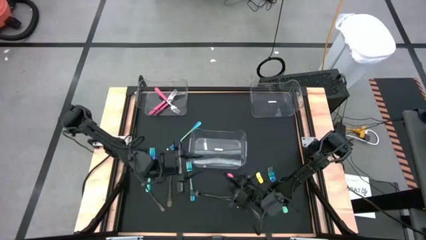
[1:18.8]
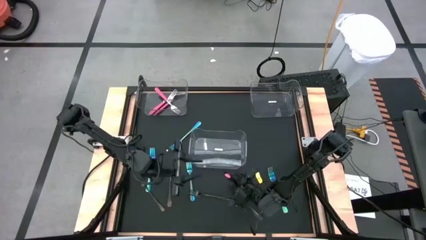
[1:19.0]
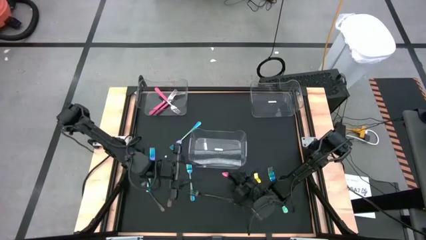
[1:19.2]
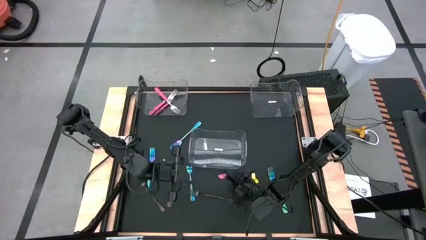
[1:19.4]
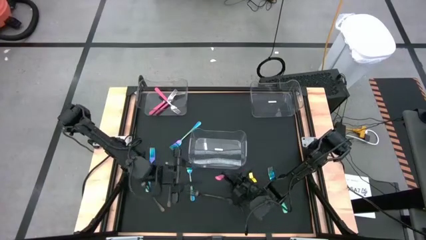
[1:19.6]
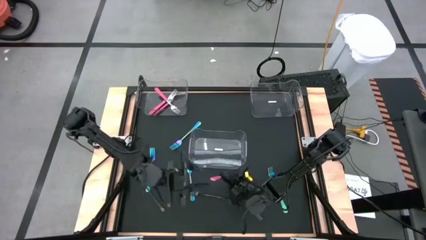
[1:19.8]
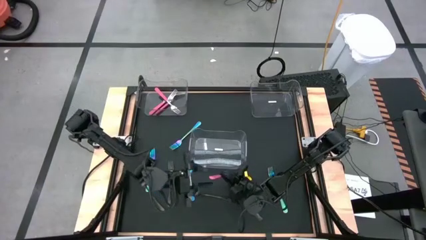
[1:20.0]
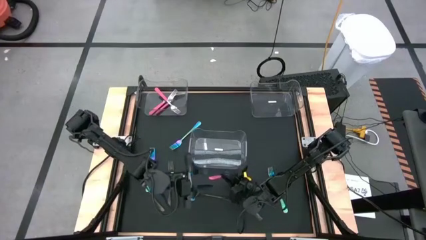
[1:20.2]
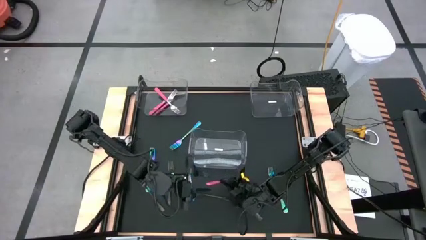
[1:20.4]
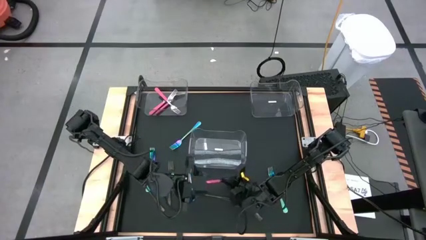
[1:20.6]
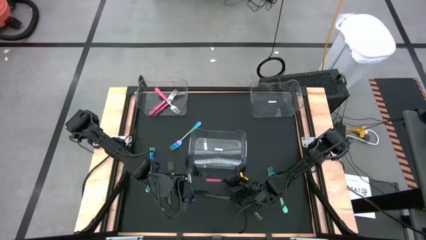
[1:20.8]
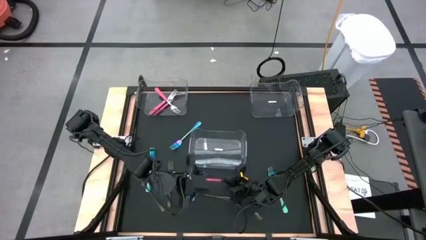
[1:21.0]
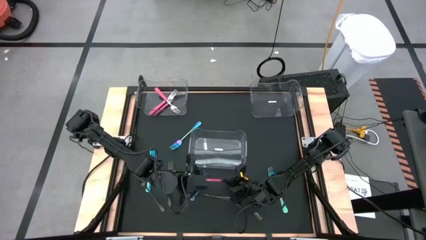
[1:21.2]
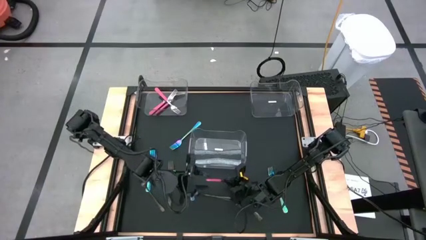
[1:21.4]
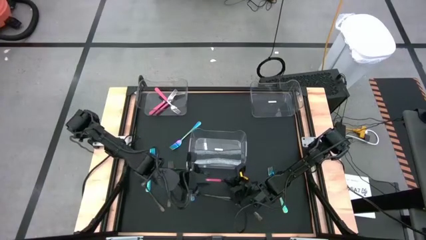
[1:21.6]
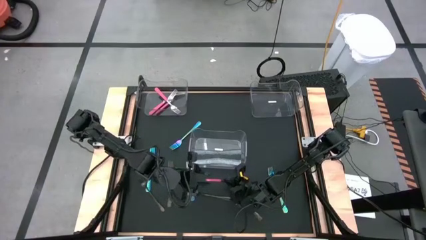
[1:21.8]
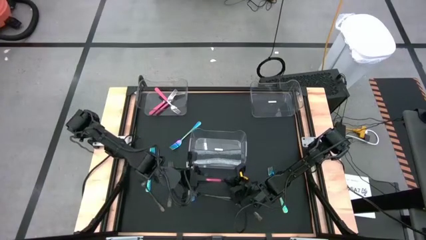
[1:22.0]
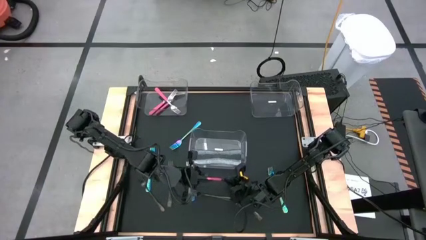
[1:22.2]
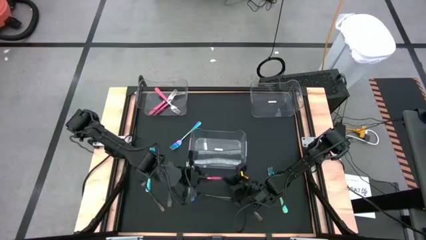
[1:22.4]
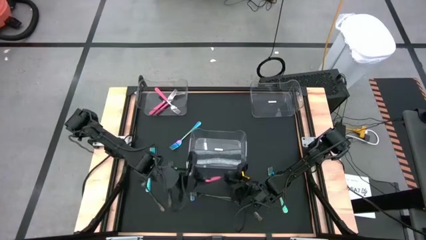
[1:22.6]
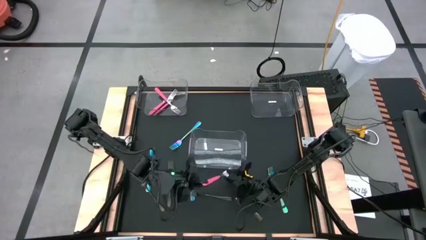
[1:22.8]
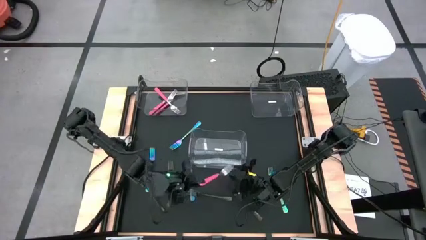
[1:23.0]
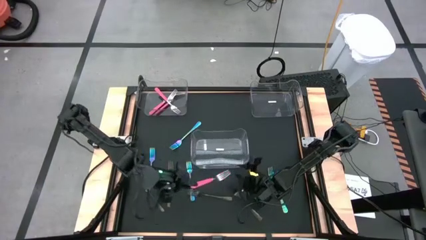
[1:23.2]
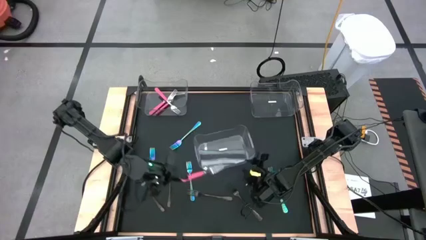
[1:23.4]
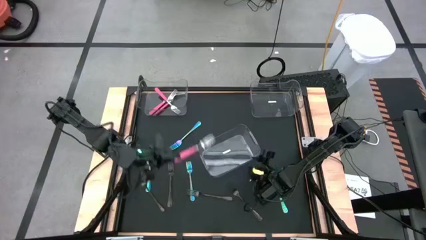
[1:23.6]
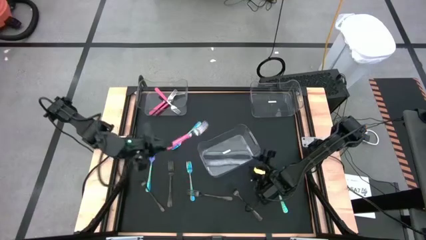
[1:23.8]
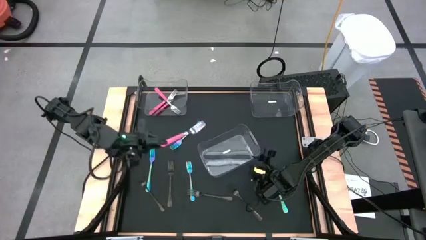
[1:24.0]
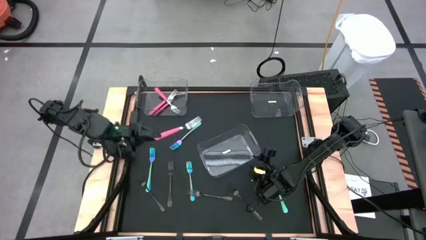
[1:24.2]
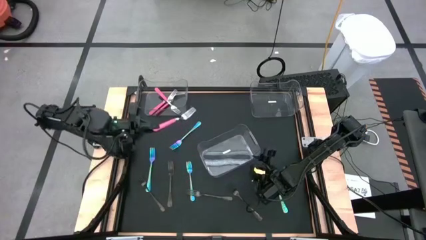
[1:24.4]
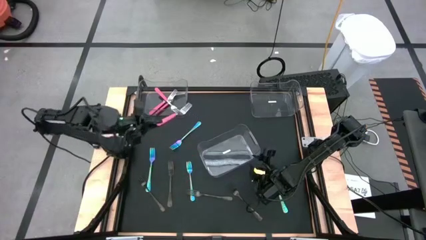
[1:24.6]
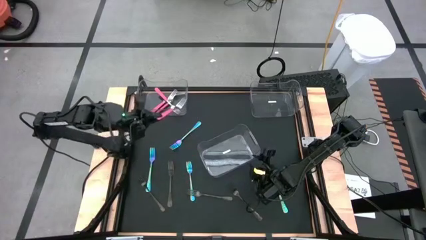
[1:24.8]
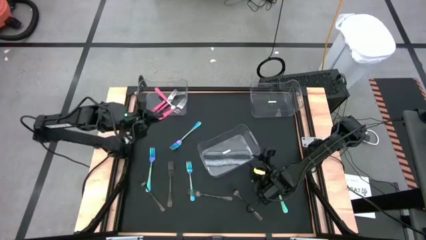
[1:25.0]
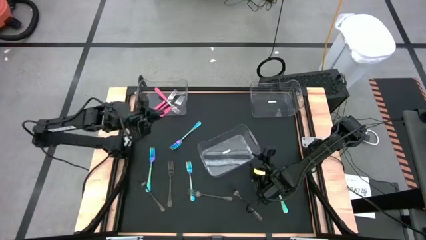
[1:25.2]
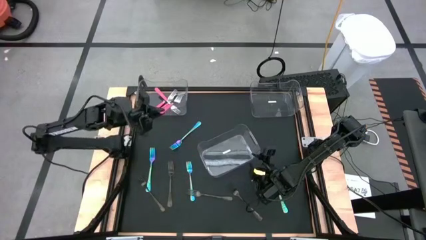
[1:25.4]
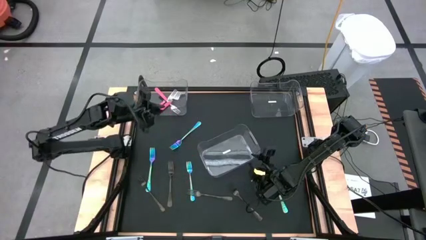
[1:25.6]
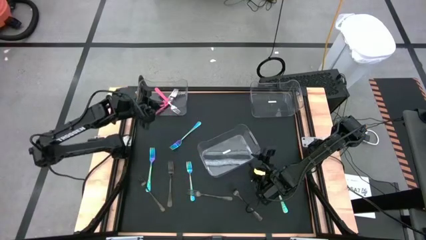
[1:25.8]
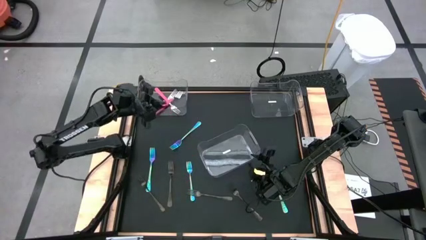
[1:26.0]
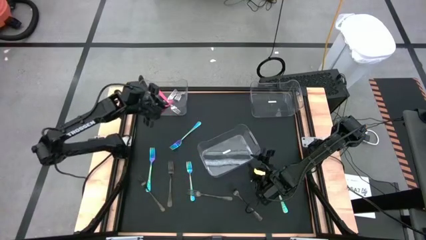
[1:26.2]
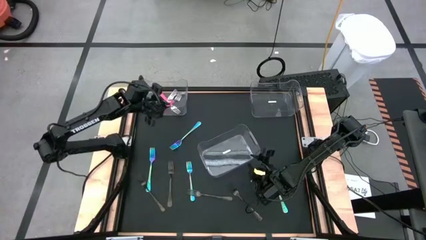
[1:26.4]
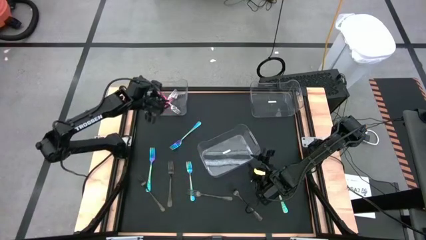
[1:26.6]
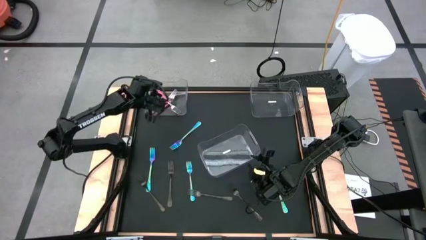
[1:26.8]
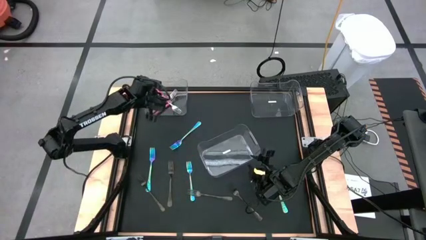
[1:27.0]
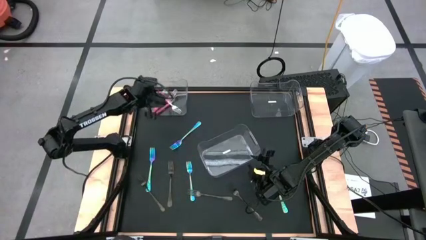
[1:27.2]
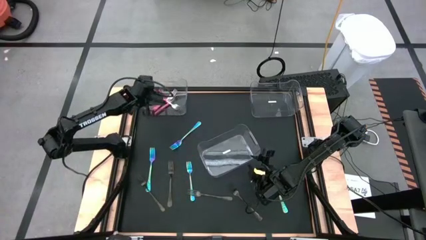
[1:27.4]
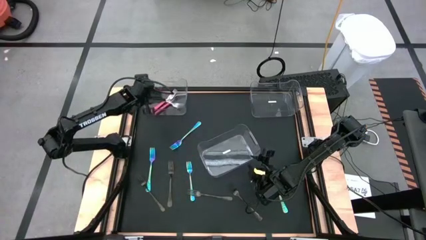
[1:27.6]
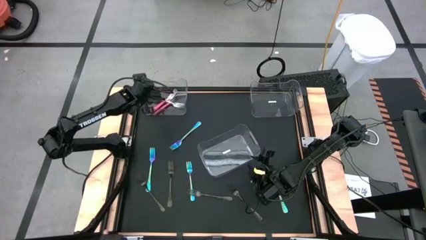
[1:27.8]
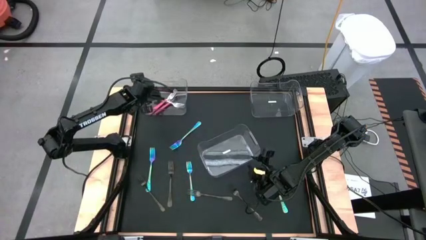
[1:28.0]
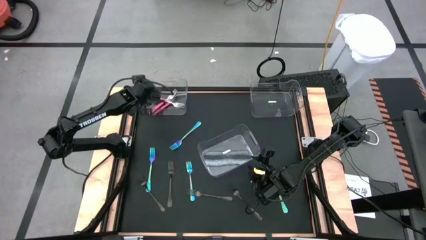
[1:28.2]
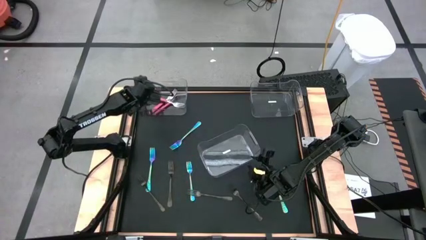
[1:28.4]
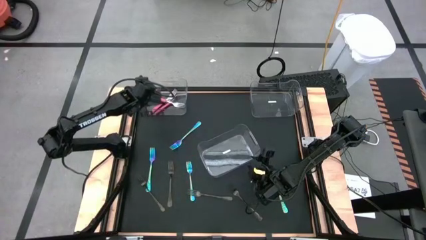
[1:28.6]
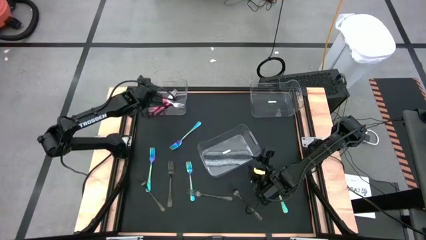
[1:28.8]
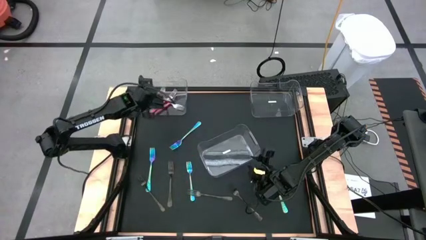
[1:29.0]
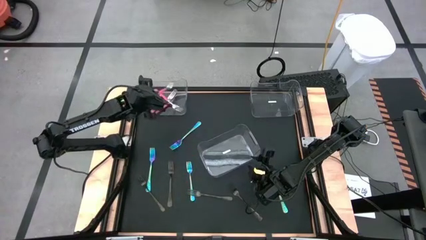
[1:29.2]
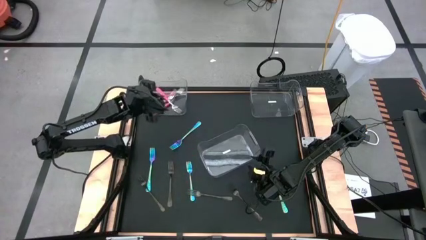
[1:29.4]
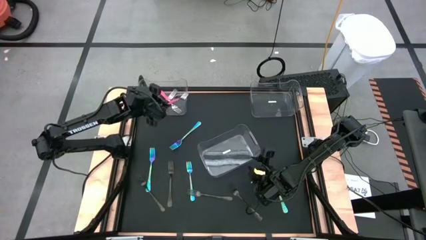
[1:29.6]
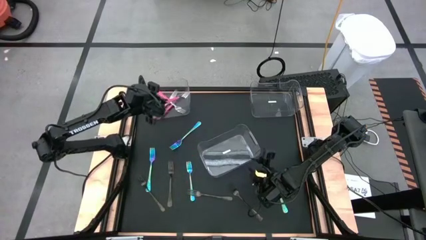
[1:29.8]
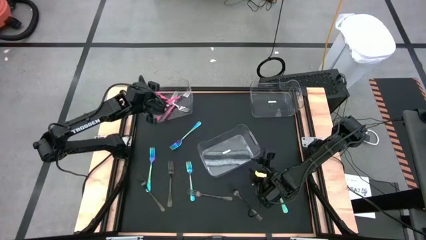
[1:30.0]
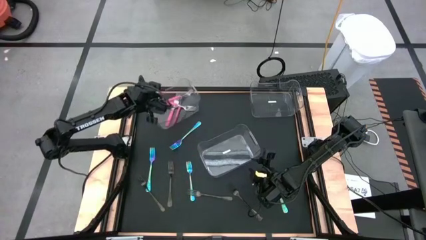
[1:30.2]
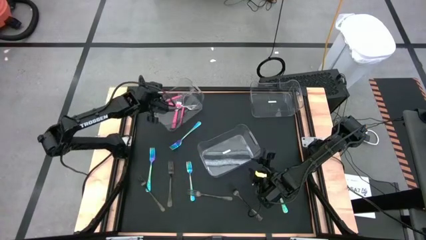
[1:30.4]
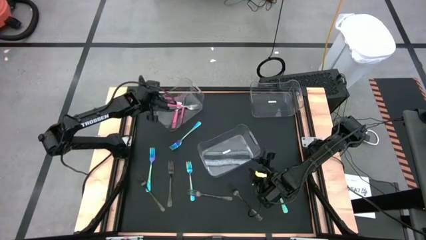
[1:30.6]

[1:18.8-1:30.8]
Task: Sort silverware by color (type)
Put the pink fork into the left transparent bin

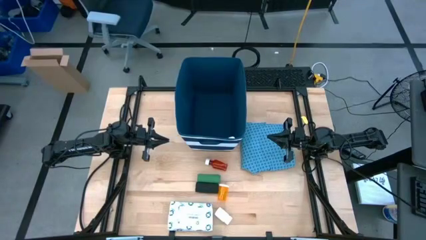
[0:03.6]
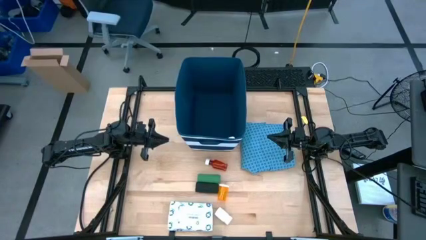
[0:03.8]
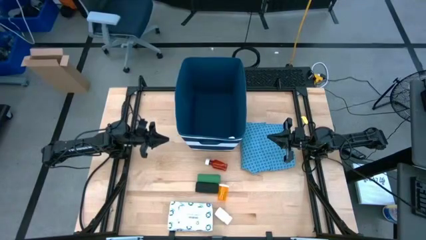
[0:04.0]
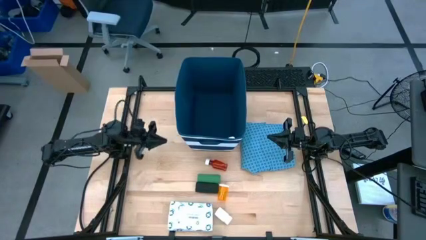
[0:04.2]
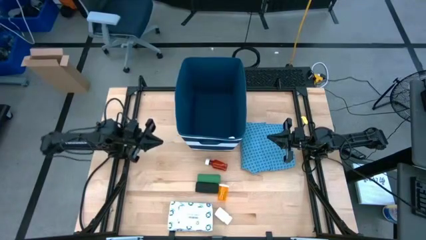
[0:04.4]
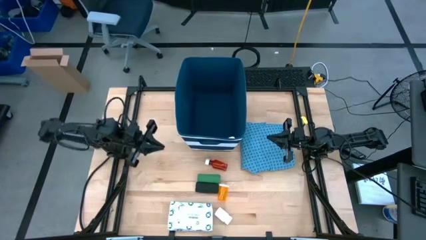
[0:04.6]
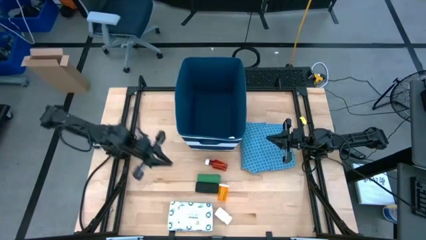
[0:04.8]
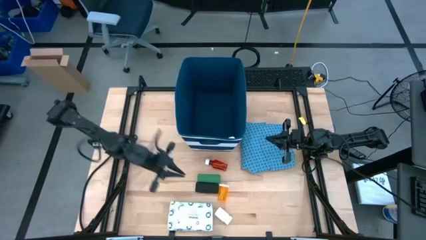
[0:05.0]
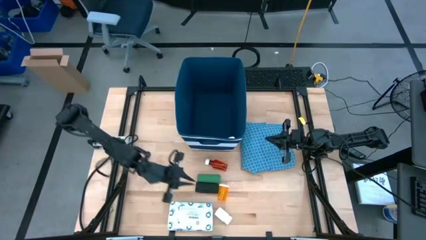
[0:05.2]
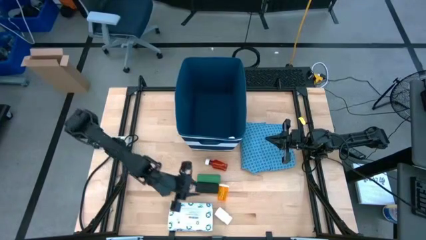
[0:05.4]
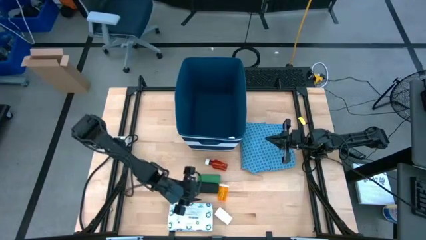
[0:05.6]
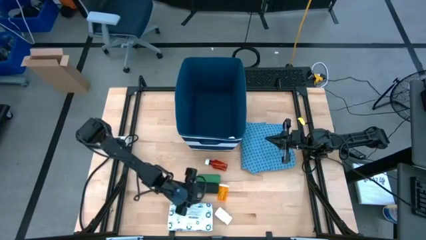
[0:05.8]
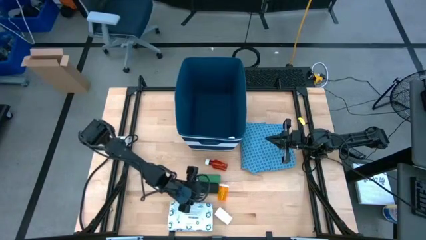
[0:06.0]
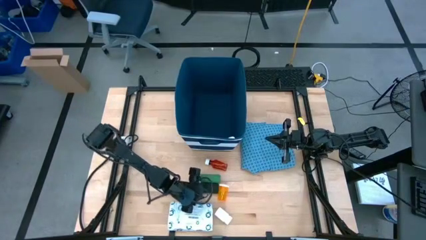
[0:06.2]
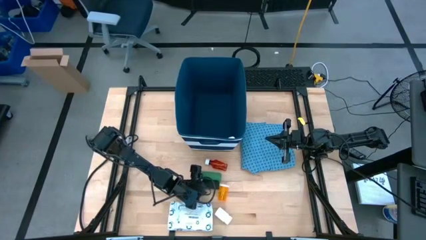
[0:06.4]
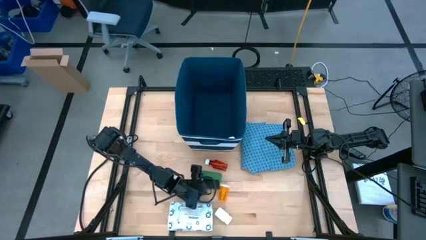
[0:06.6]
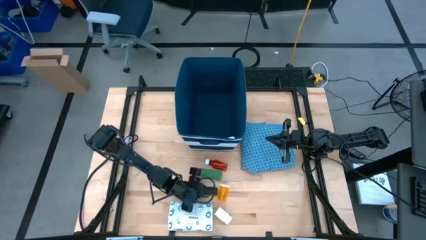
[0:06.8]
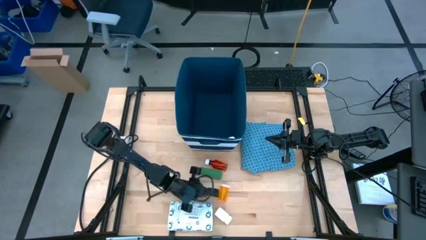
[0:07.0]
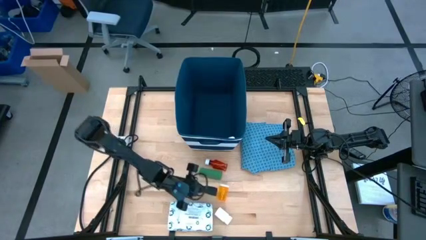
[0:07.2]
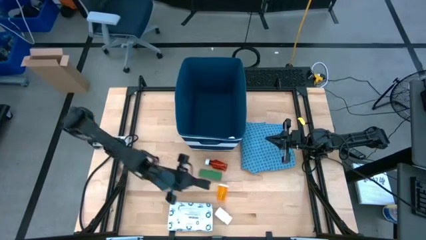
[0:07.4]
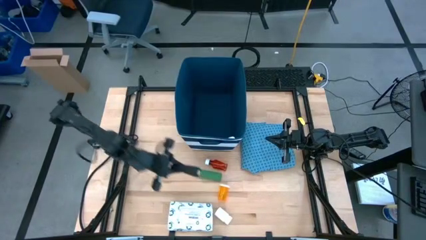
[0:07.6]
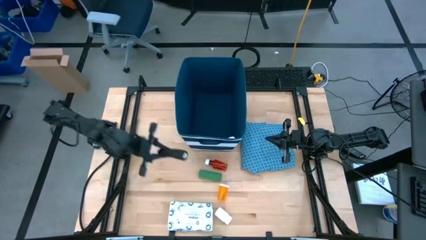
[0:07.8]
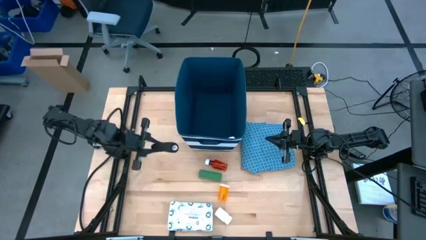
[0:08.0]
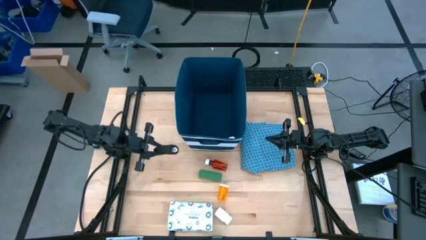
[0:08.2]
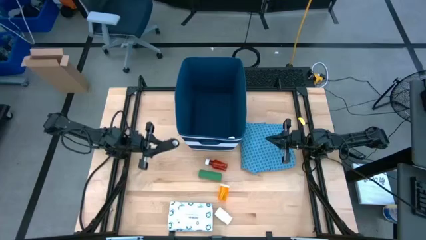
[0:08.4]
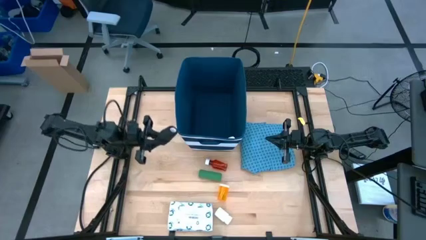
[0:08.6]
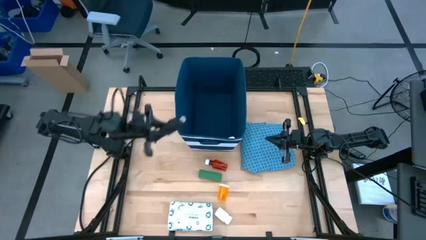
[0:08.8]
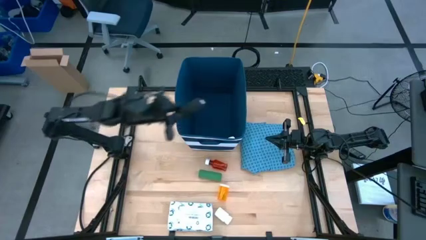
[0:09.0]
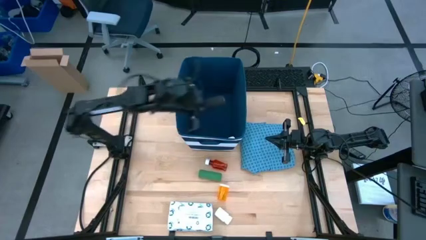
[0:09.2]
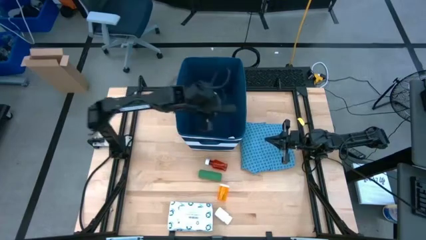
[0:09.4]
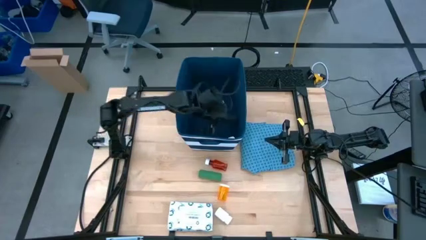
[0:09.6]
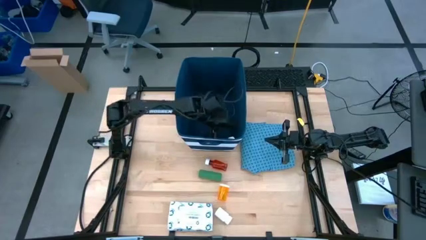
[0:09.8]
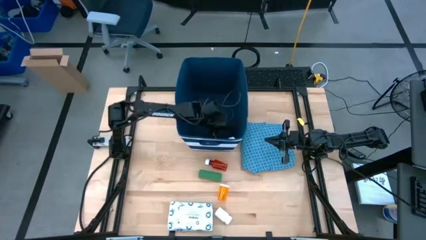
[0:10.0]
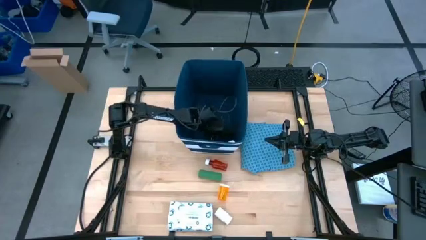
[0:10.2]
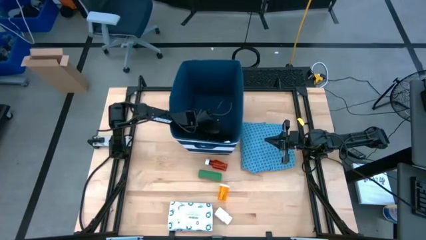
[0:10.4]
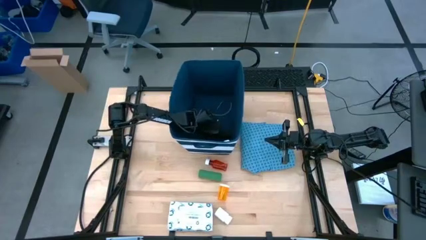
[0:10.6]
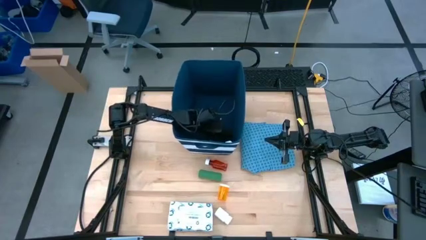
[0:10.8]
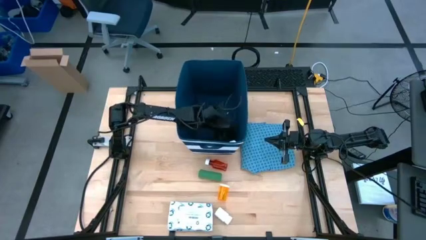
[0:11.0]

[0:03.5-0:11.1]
Task: Pick & place medical supplies in basket/bin
Put the black bandage into the blue bin
